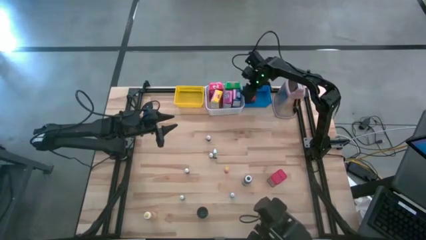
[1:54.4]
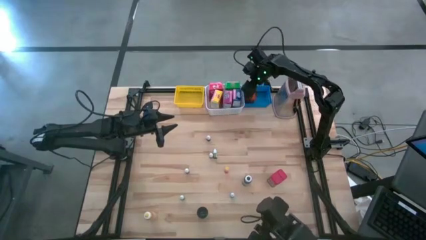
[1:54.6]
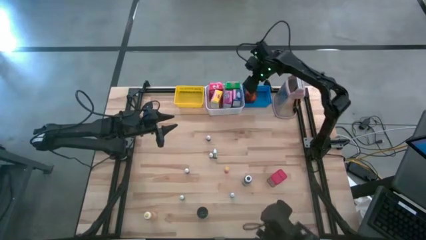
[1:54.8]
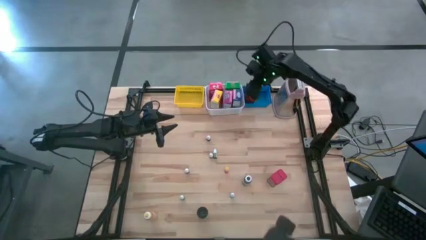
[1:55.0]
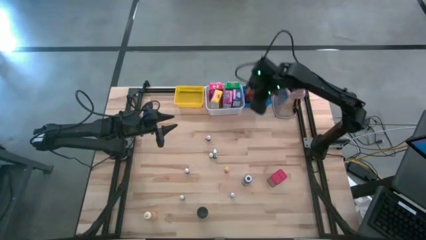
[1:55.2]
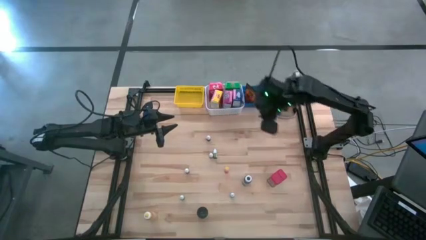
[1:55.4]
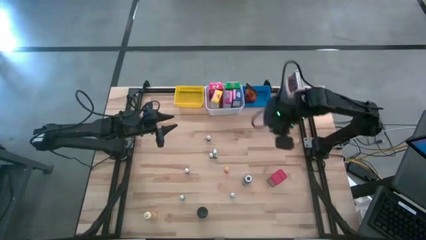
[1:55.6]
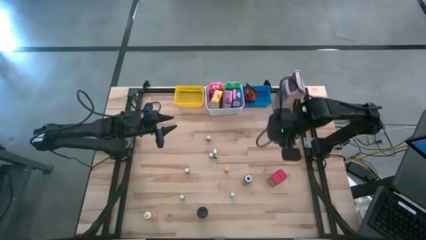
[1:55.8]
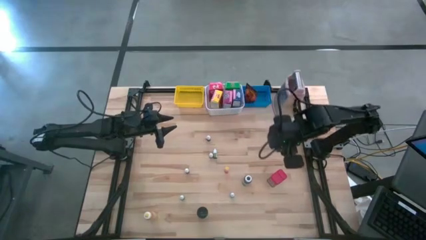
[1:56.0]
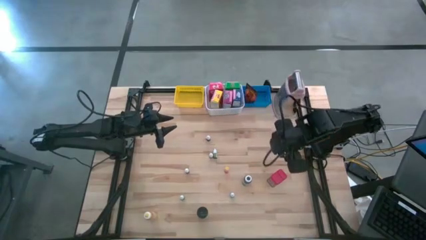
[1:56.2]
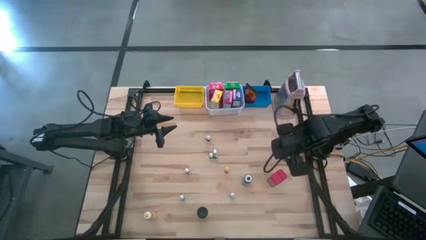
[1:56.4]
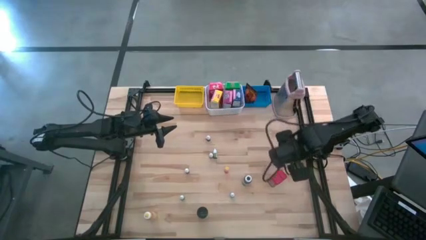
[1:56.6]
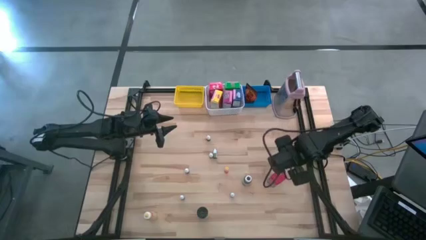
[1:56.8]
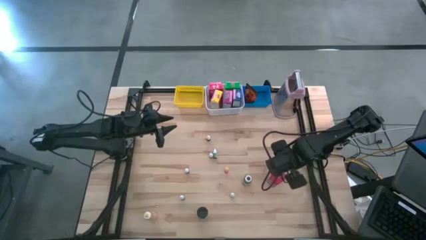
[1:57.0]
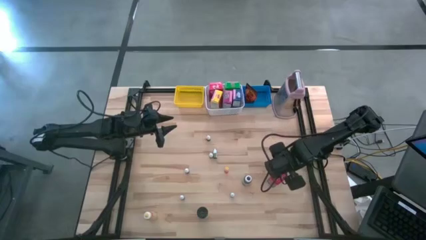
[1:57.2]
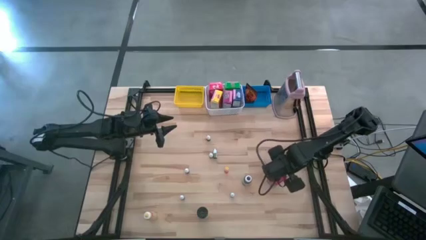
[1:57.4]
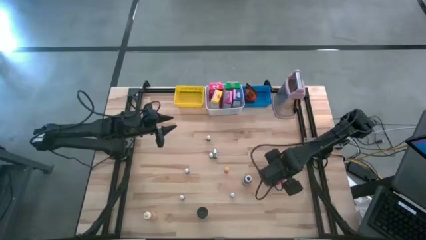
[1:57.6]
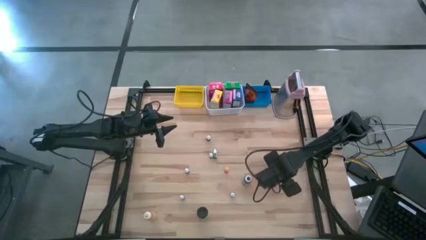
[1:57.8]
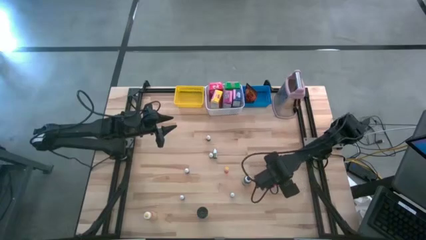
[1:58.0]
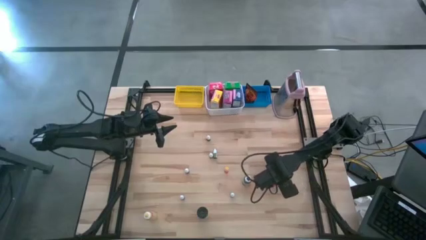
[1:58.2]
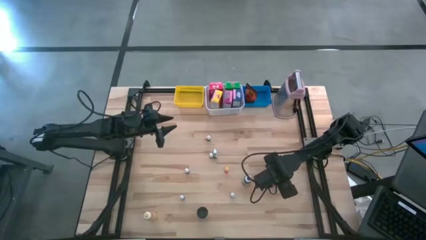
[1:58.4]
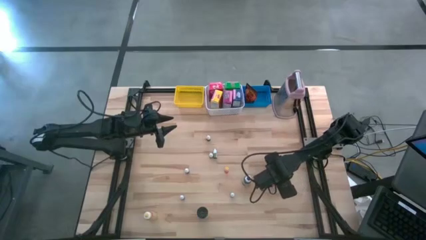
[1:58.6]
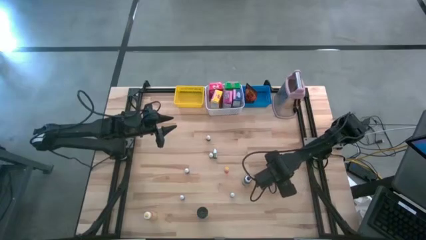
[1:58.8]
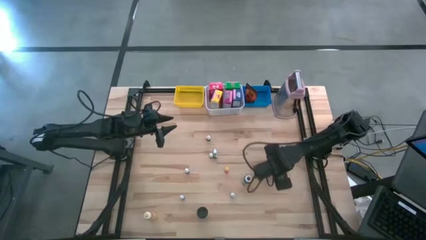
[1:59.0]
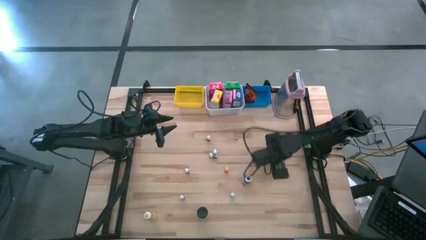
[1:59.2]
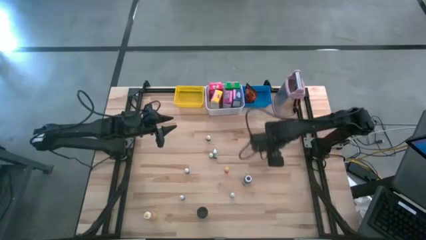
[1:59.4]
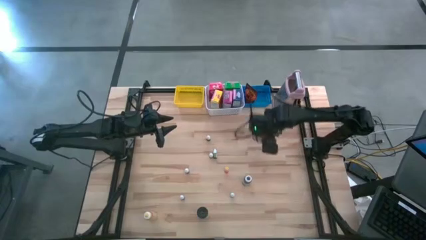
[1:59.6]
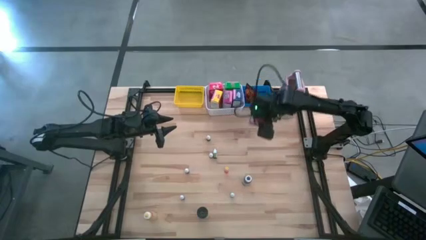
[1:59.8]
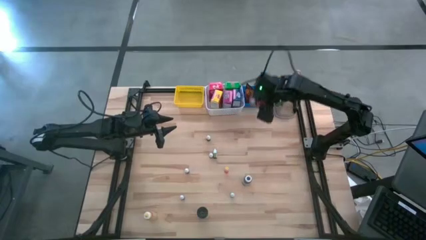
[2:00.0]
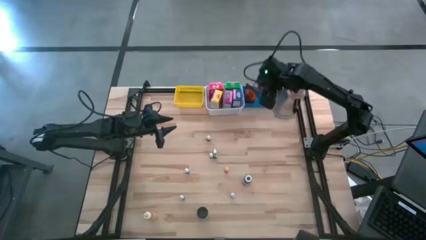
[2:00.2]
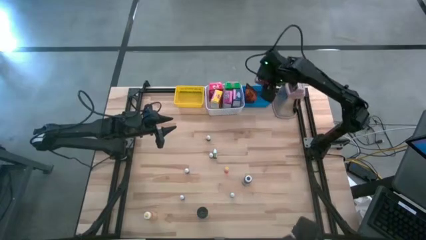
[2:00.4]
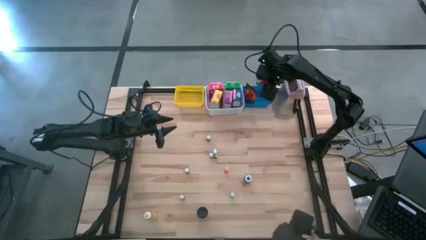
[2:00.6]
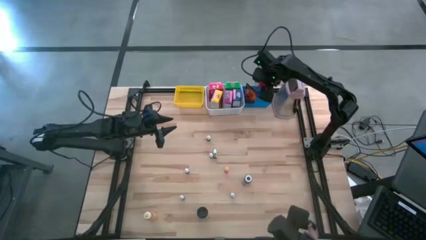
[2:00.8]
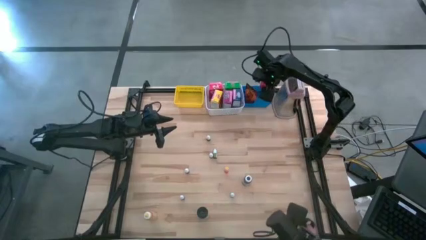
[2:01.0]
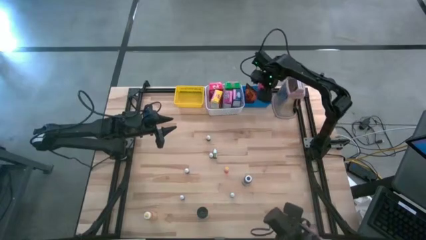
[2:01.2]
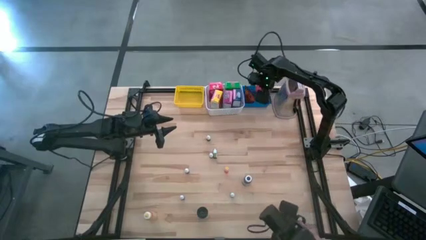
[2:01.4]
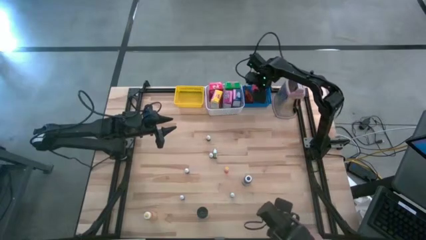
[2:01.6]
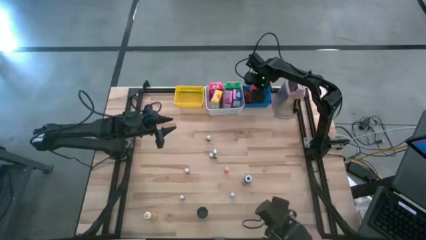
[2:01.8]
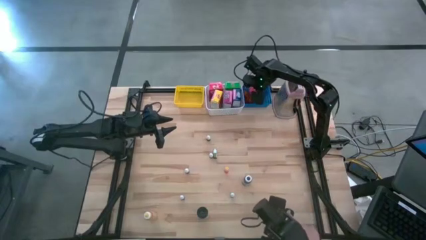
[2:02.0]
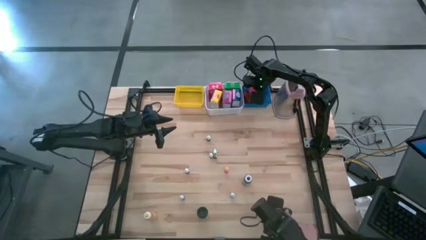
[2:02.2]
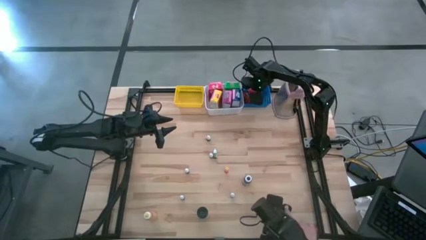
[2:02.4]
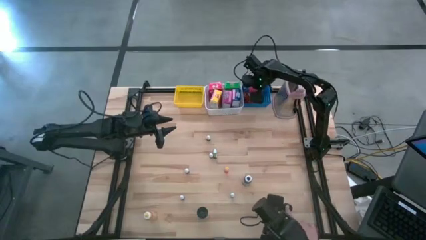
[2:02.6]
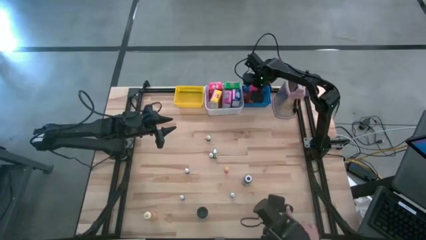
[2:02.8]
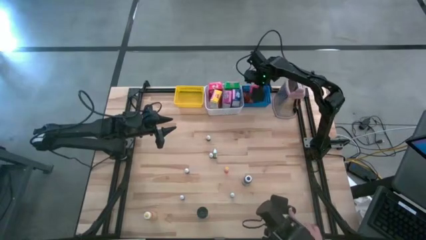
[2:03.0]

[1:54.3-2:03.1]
Task: Pick & Place Kitchen Items
Put the red seasoning can into the blue basket

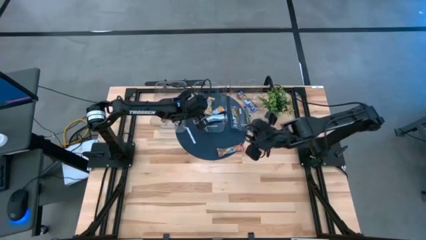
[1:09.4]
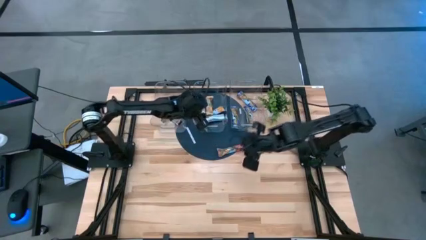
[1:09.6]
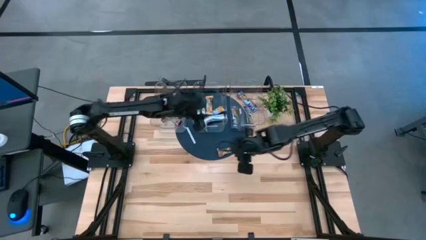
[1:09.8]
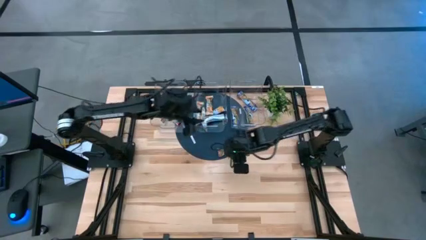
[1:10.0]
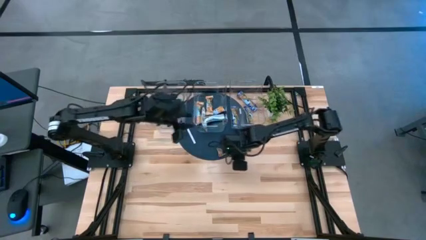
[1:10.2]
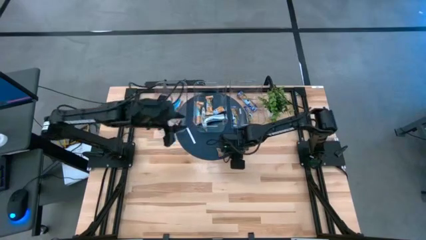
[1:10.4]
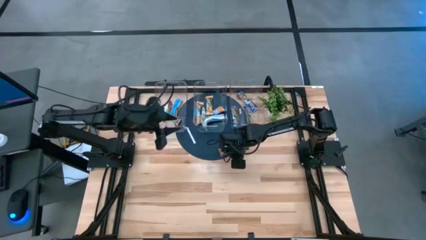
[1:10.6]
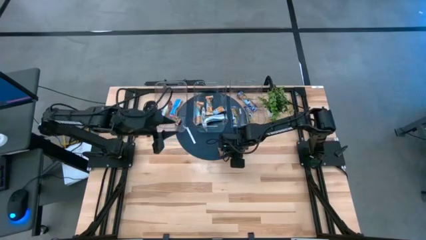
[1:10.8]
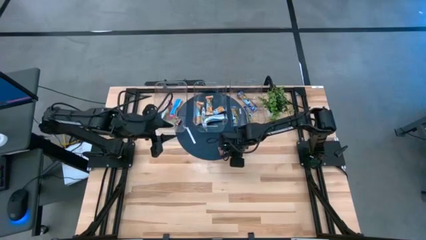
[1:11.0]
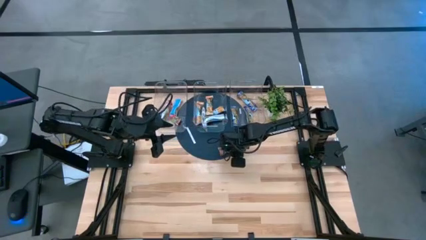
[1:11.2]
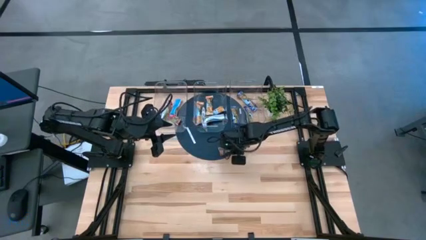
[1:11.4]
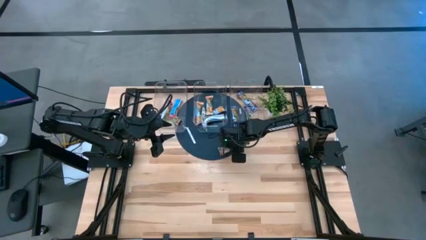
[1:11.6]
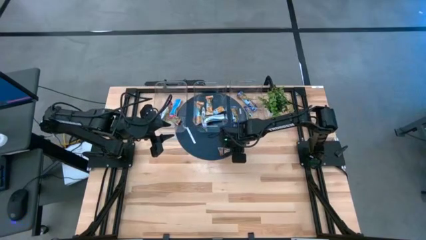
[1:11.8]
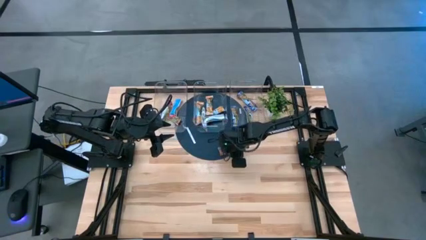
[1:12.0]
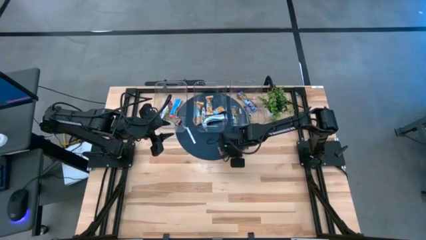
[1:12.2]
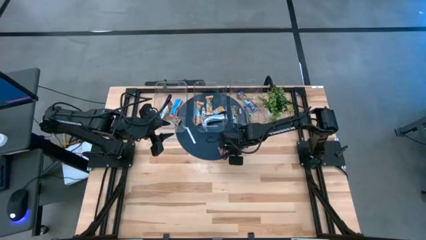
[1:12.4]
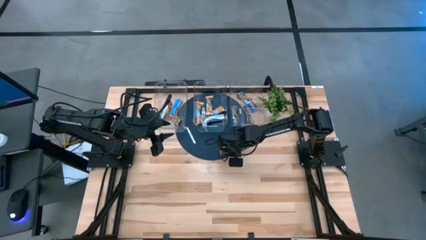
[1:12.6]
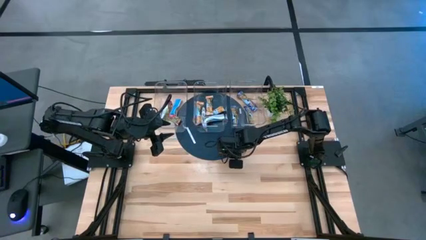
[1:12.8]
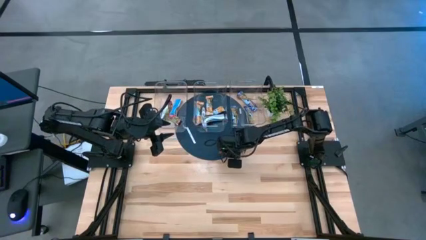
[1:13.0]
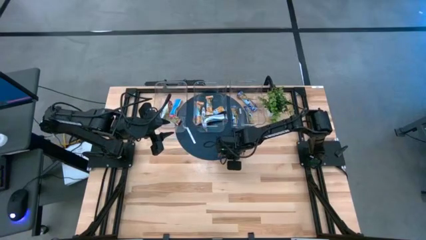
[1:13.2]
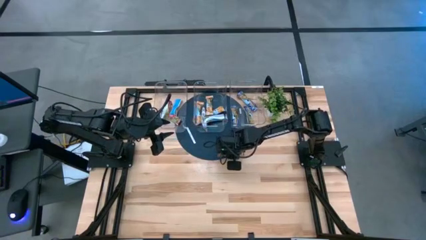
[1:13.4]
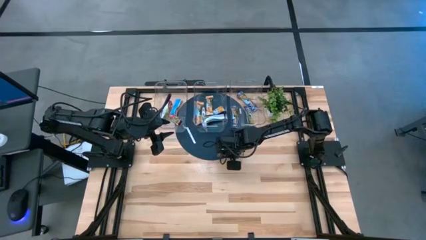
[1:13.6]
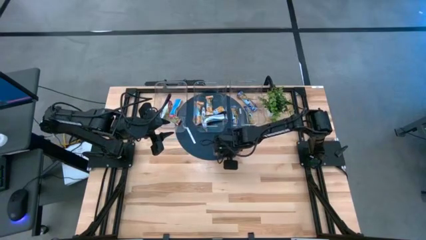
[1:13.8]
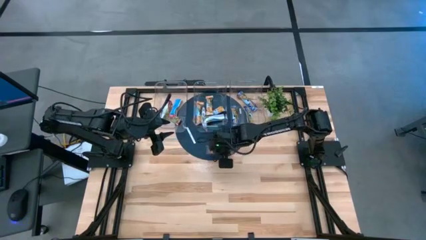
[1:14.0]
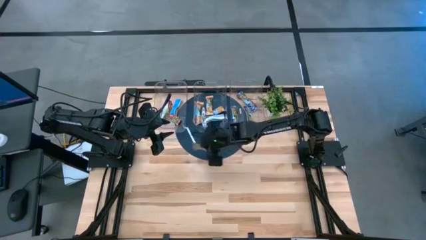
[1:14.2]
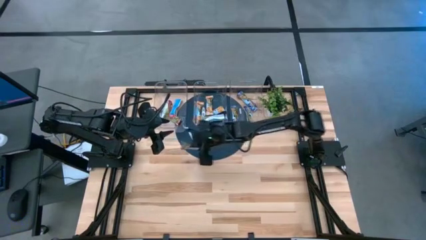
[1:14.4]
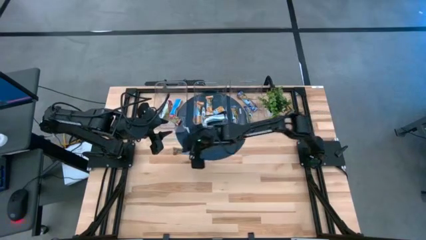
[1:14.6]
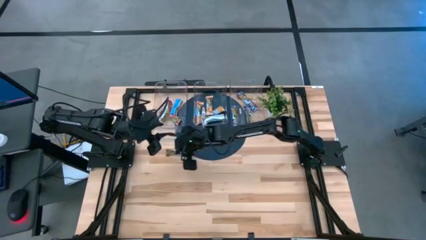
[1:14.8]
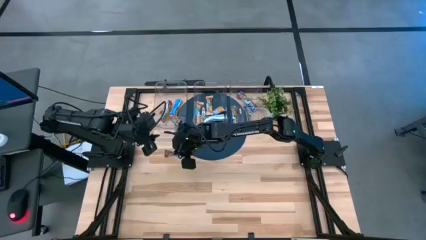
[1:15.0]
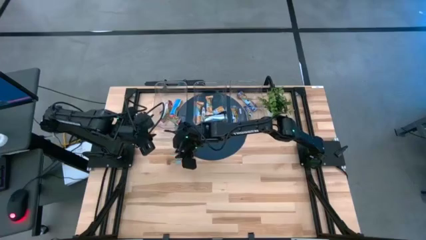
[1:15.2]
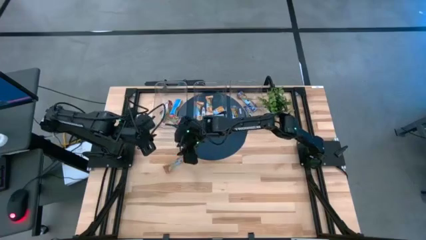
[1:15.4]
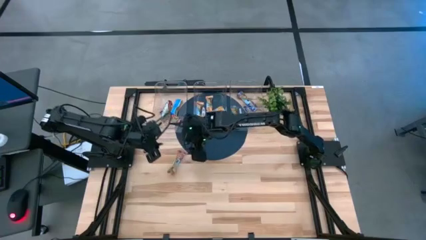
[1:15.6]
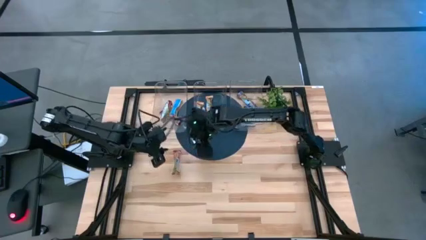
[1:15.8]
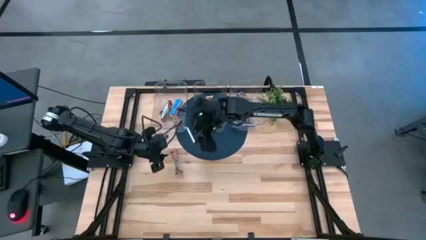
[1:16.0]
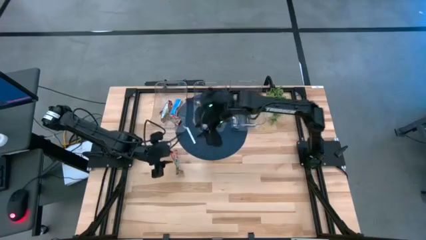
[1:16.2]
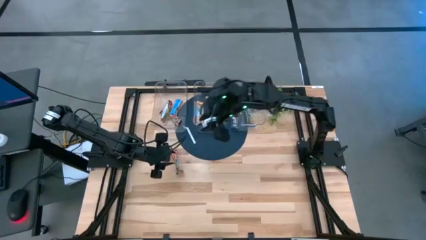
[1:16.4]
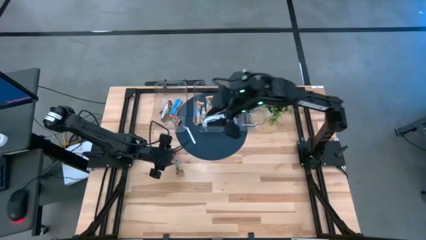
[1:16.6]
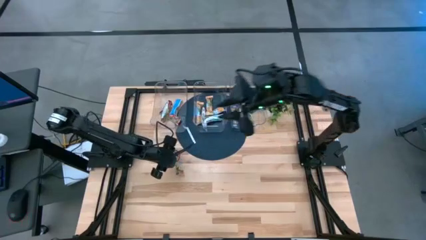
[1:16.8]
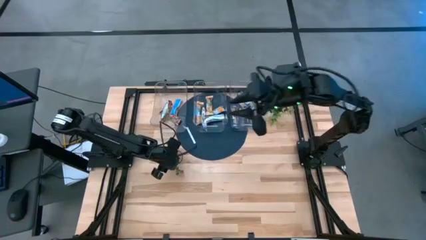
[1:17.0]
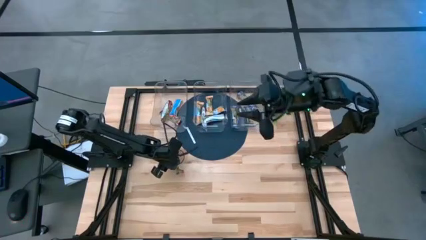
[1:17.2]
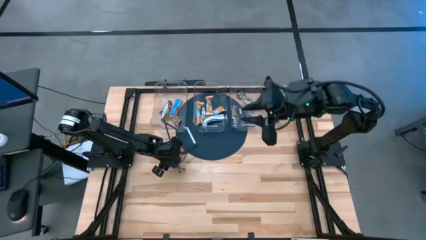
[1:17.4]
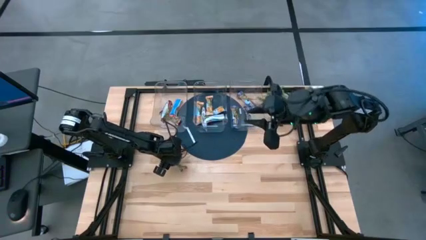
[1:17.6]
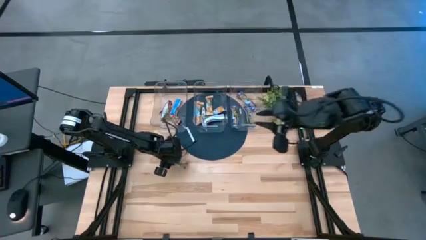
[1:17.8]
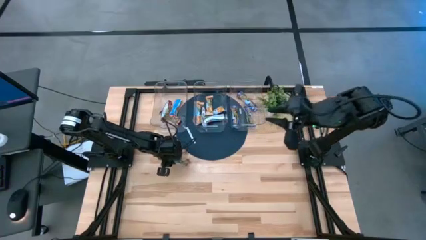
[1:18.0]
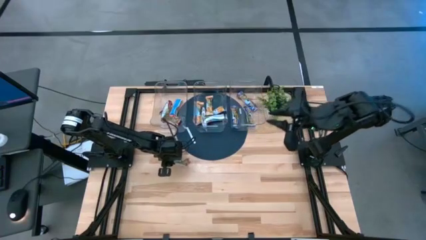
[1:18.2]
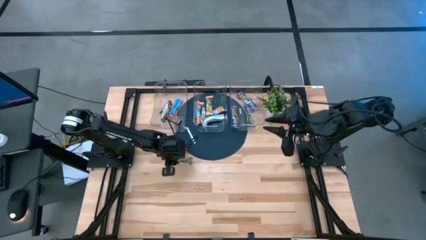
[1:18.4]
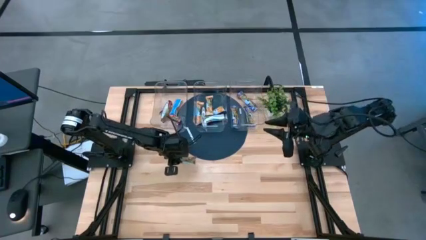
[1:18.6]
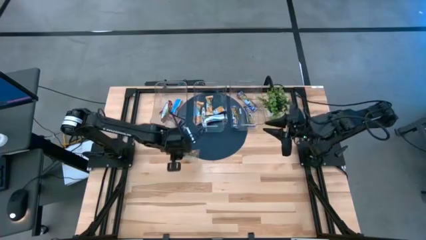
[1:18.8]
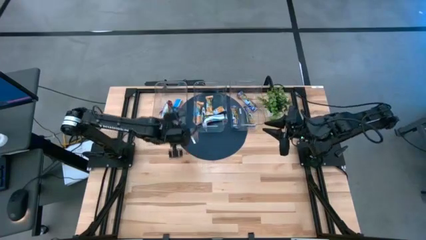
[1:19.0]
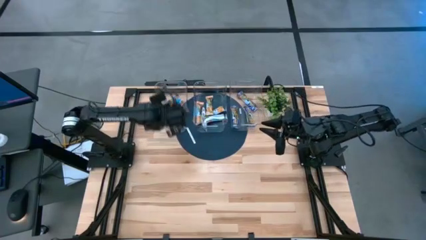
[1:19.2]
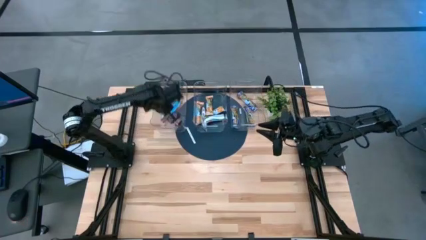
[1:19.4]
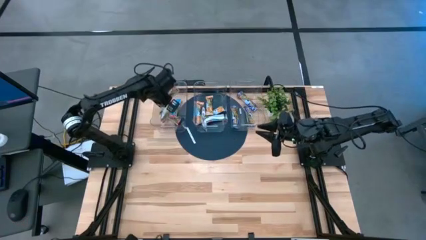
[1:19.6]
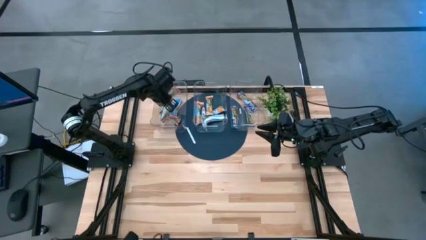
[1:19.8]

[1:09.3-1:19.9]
Task: Pick and place Granola Bars by type
Put the red granola bar into the left transparent bin
